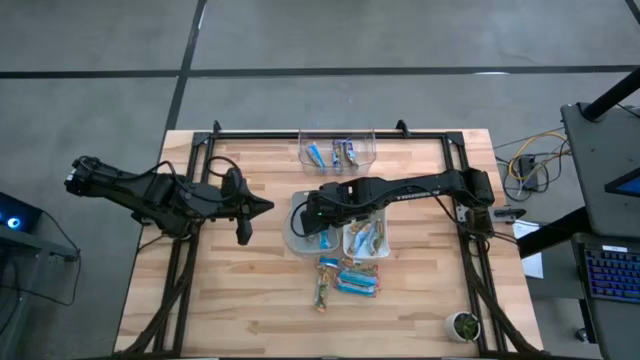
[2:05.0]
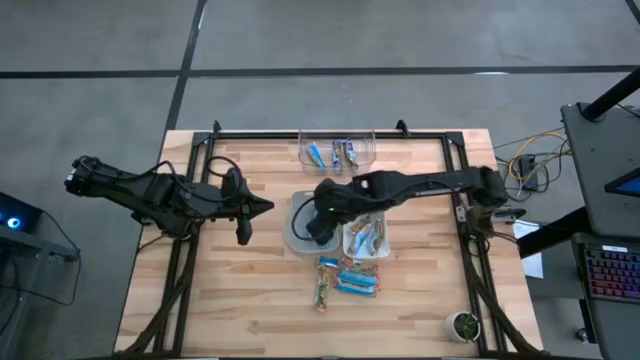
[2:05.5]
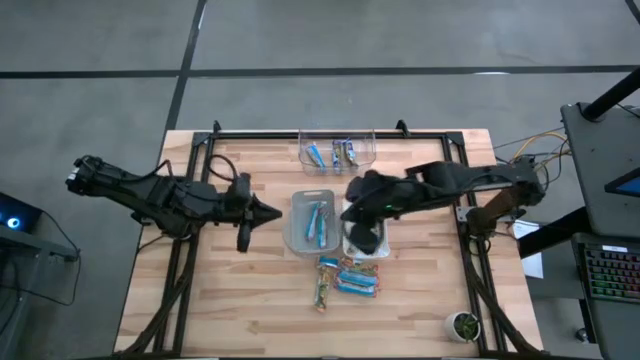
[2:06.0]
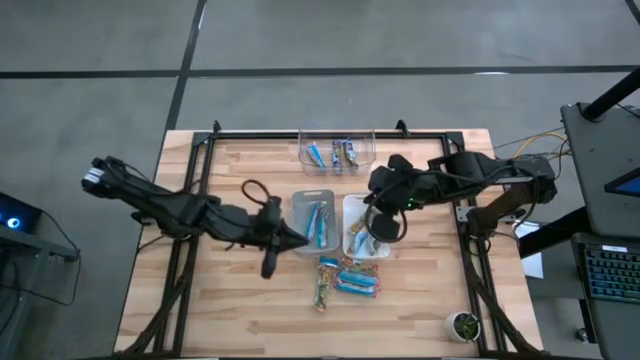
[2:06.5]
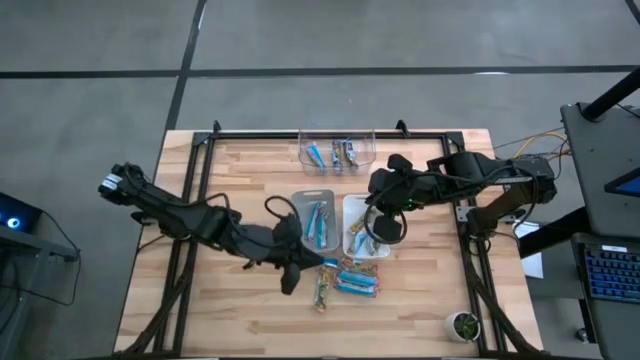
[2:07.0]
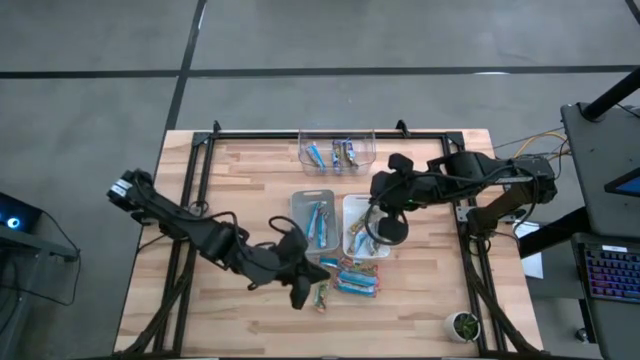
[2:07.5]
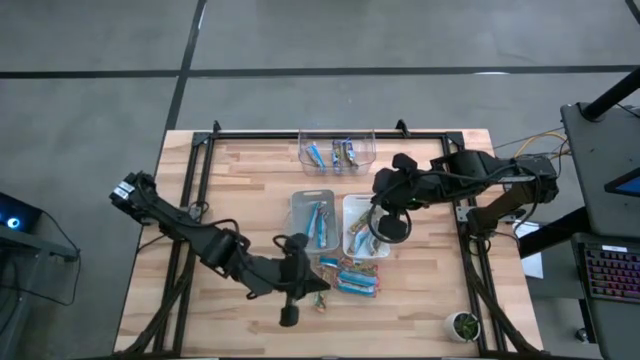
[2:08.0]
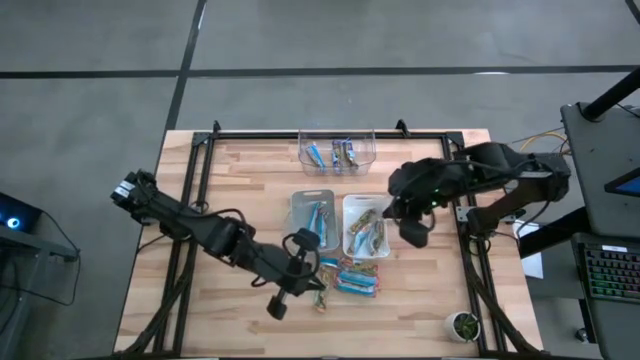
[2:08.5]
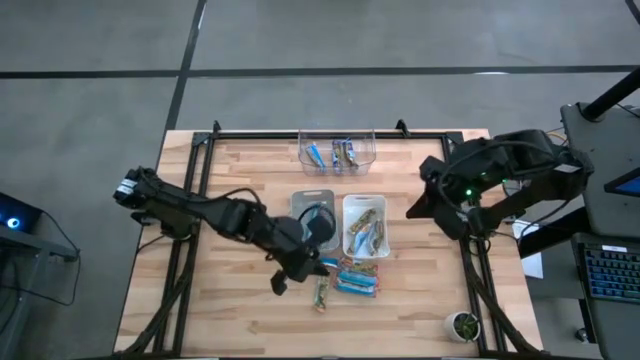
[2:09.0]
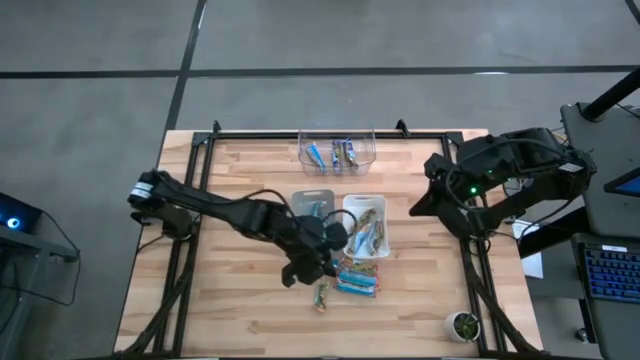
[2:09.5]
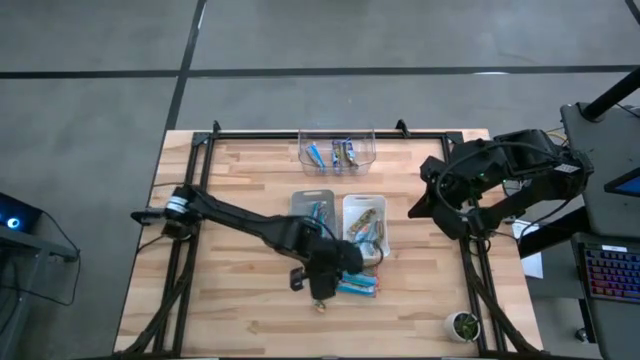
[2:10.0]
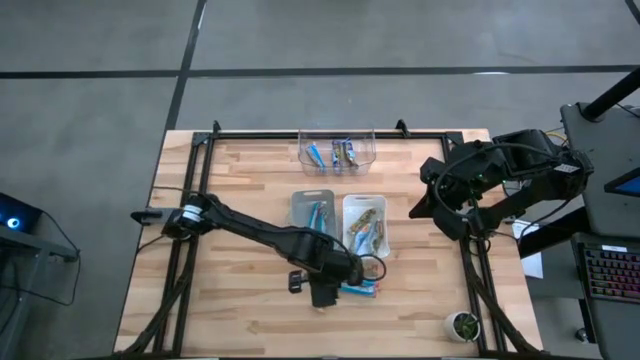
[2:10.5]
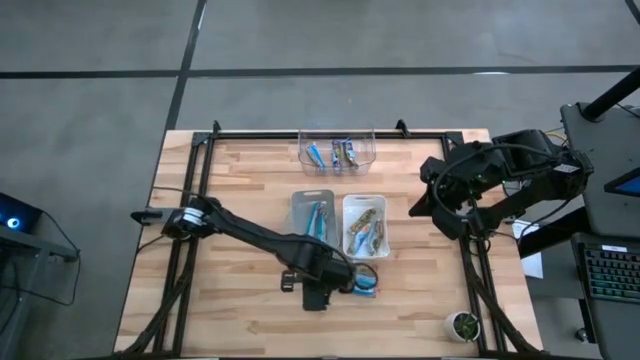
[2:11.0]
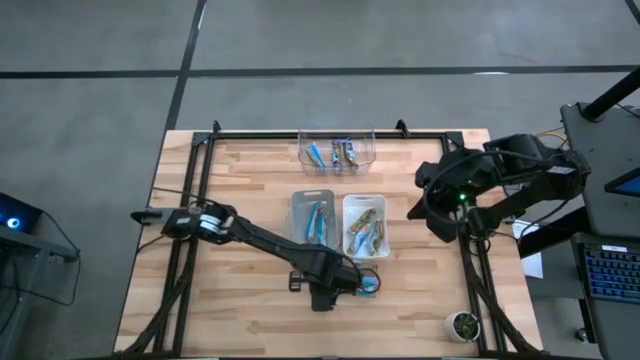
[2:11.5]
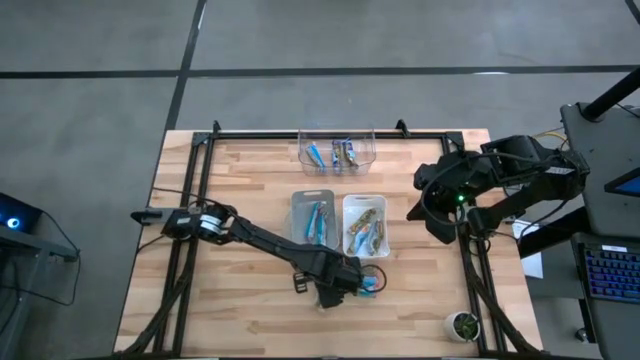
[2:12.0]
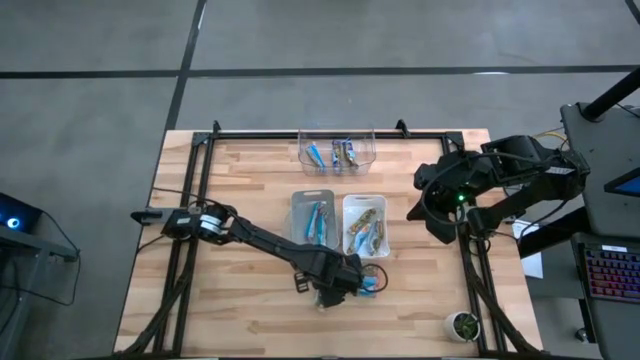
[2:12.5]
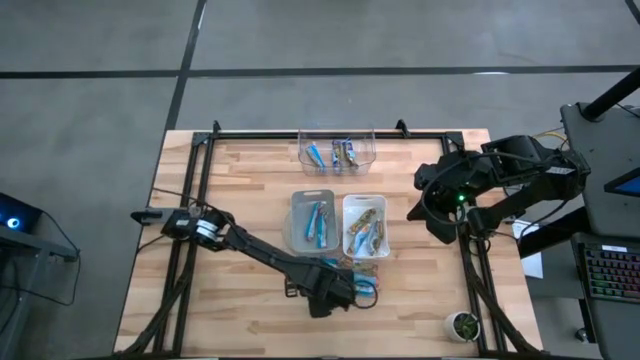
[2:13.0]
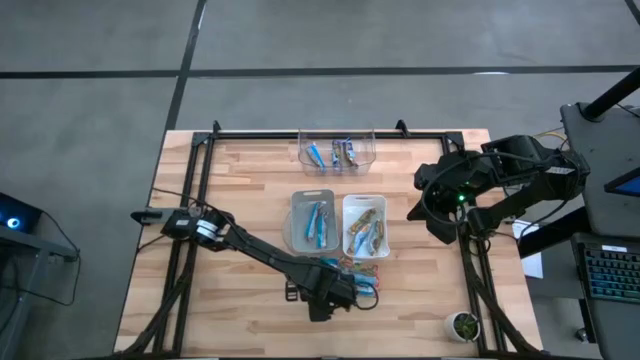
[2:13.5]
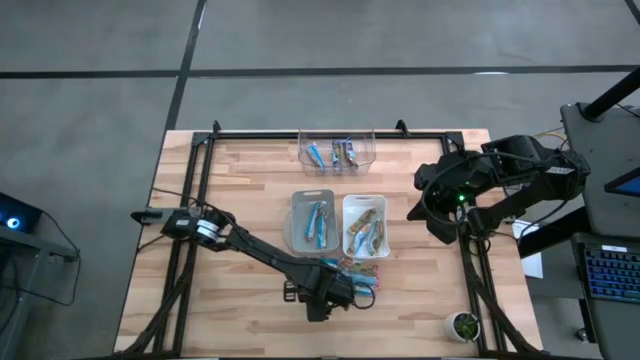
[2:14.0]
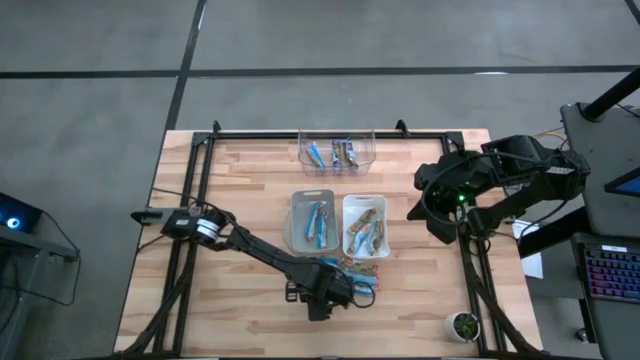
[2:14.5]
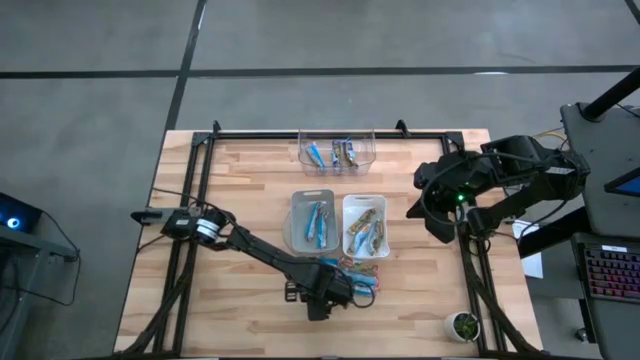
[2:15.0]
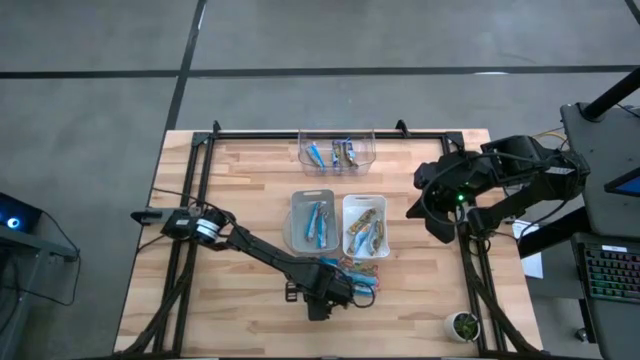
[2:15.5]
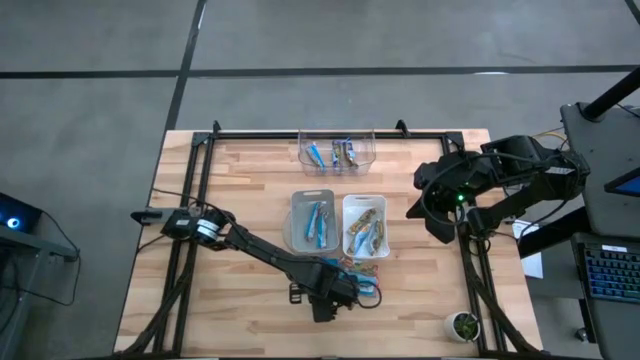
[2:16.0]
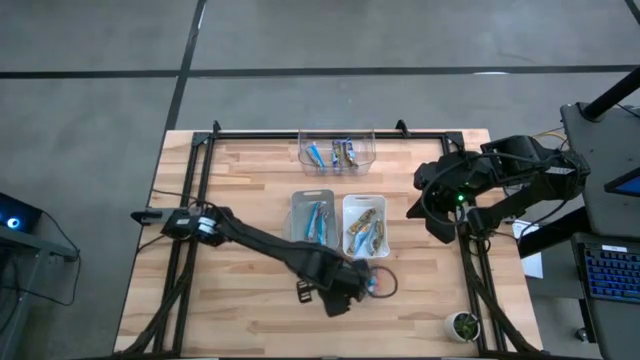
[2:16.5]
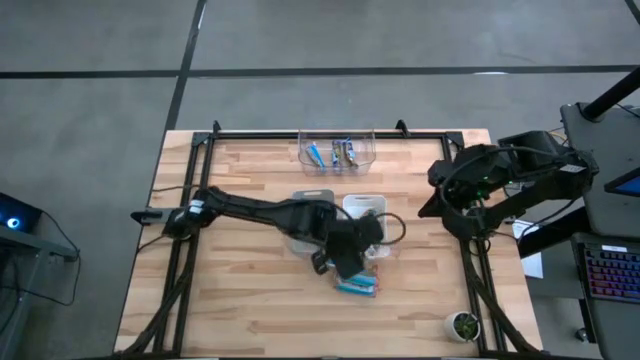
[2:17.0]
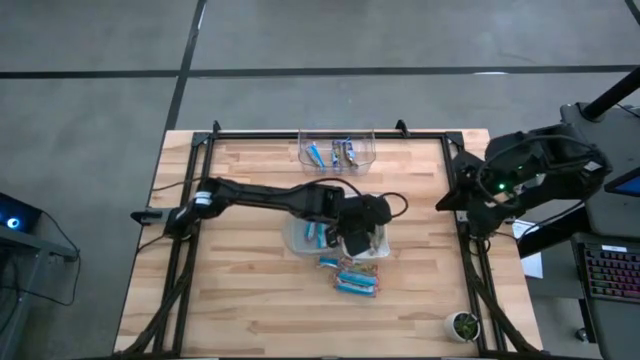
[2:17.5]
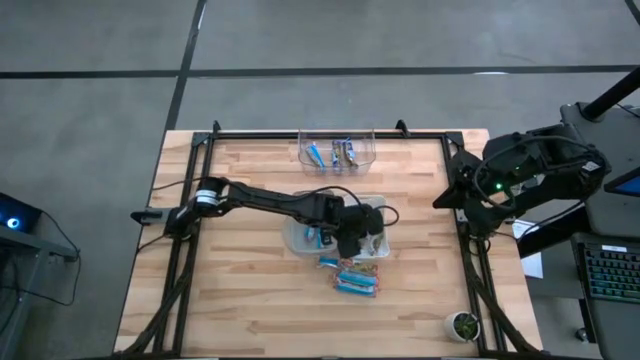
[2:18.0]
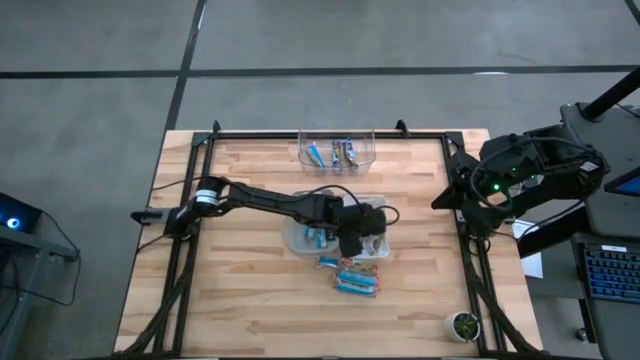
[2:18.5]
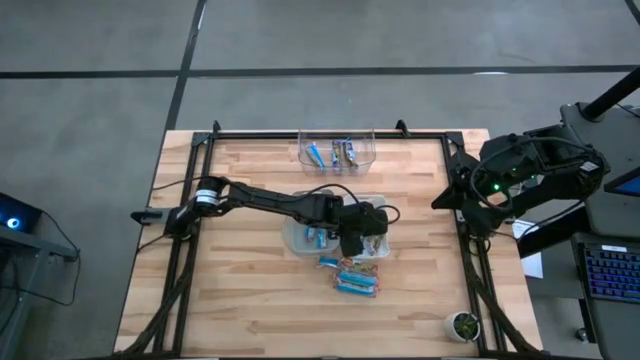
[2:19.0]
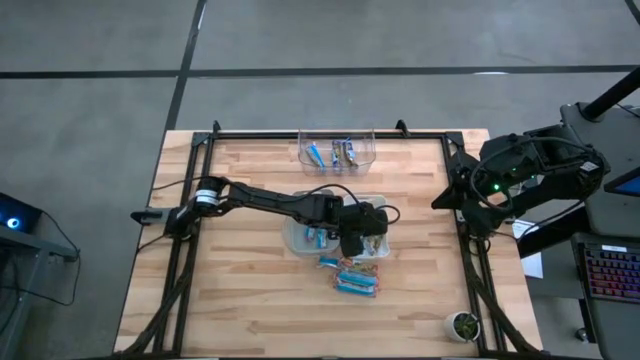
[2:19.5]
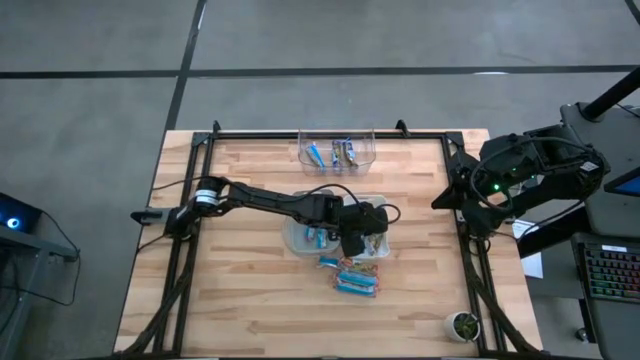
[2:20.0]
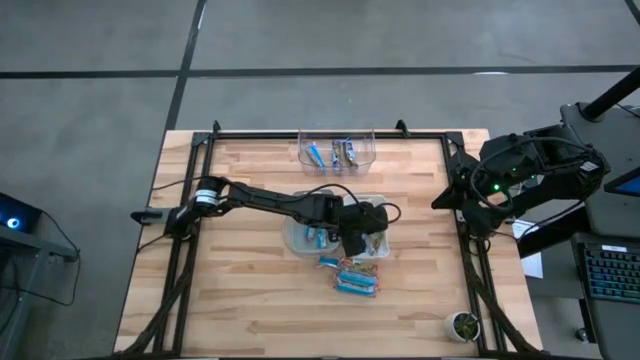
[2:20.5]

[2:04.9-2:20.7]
Task: Pick and place Granola Bars by type
Put the orange granola bar into the white bin

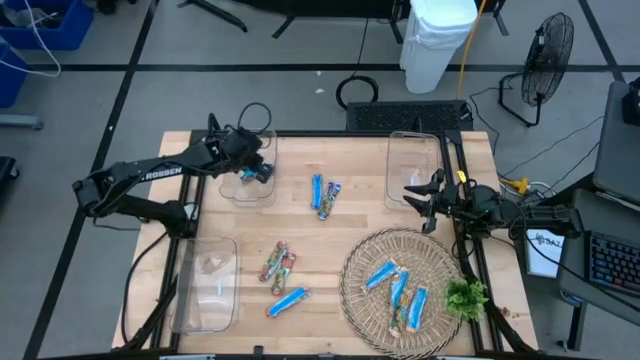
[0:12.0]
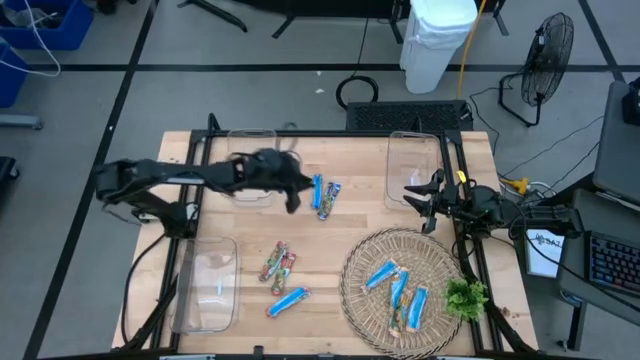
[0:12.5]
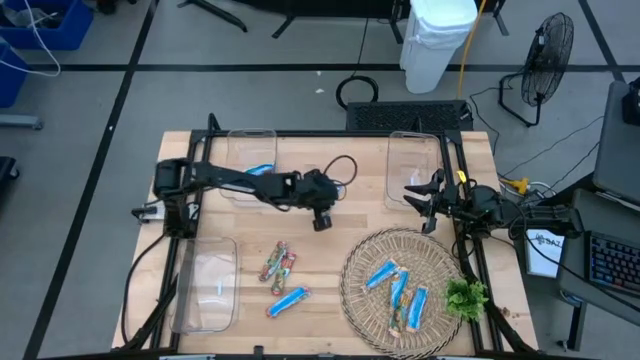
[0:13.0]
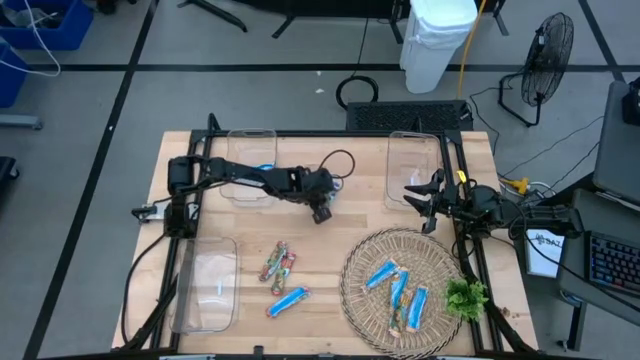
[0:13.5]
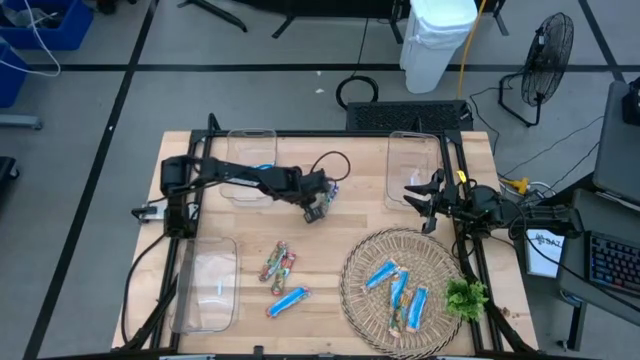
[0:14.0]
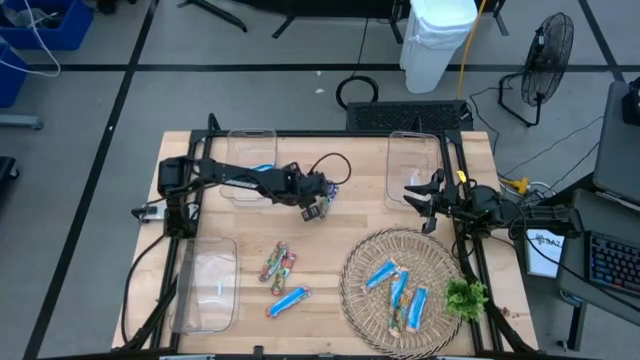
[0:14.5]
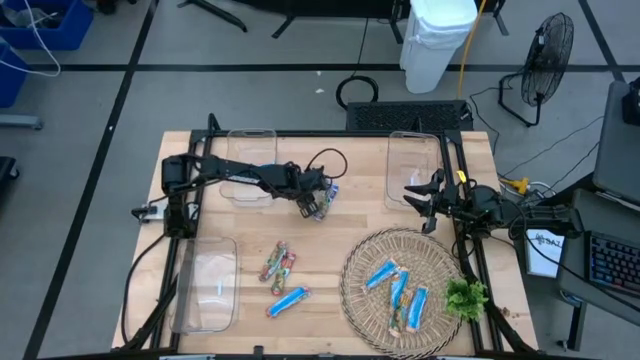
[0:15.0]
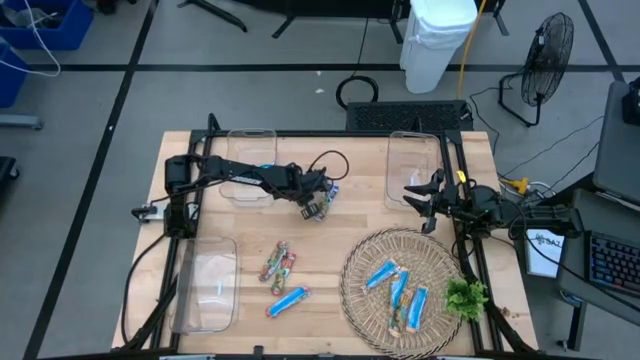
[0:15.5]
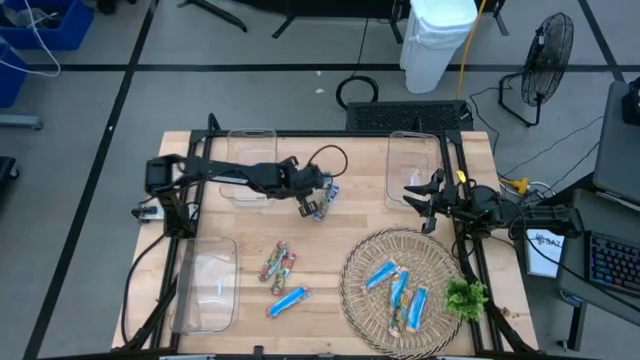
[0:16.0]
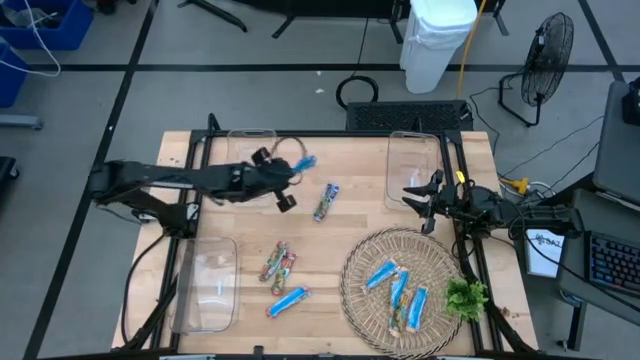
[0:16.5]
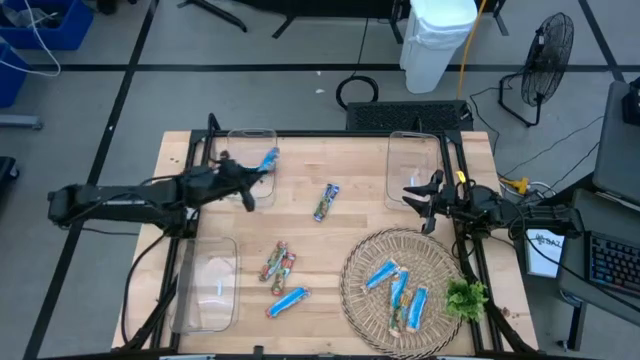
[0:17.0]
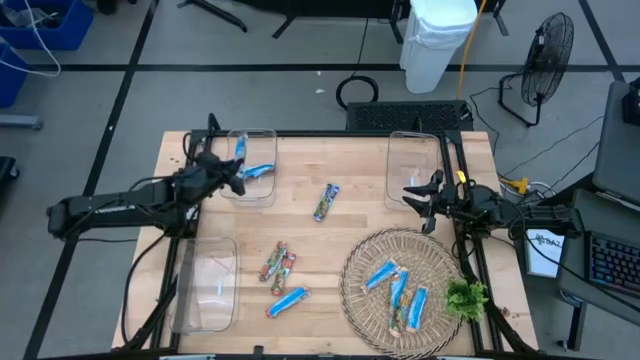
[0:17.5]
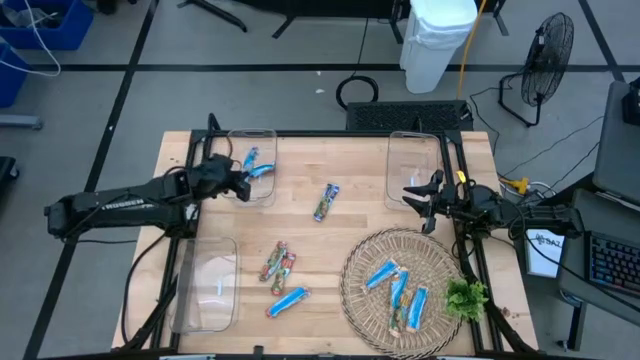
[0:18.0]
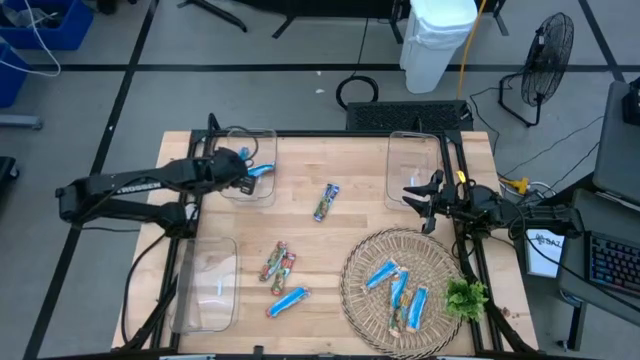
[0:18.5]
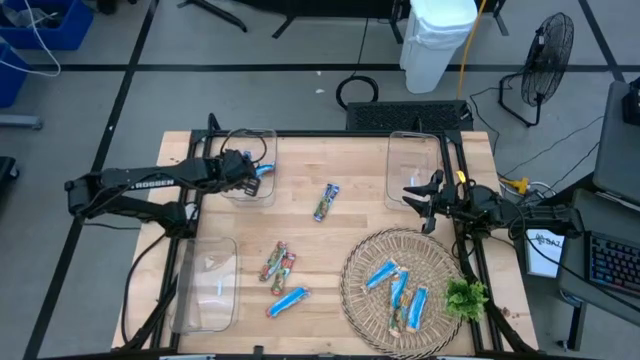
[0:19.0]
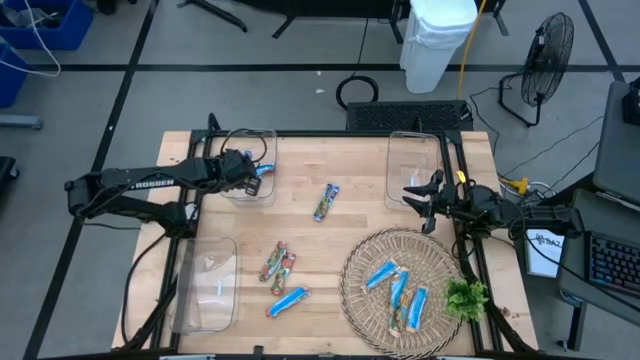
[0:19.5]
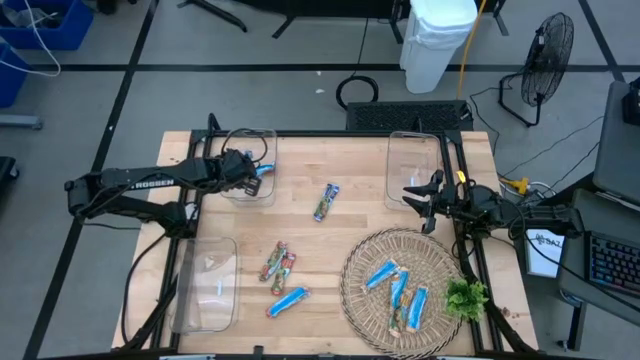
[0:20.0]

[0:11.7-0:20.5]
Task: Pick and place Granola Bars by type
Put the blue granola bar into the top left transparent bin
